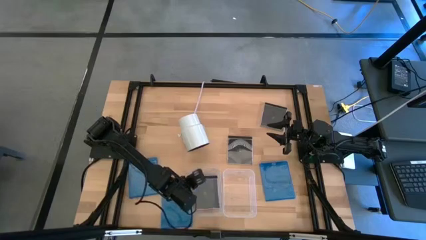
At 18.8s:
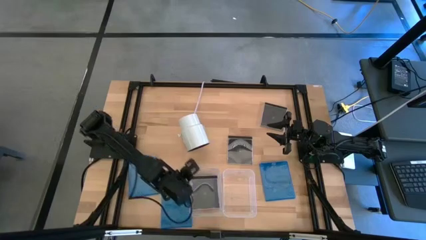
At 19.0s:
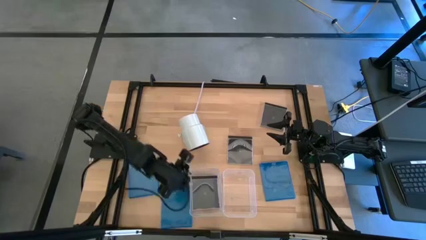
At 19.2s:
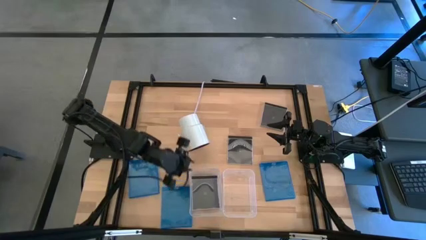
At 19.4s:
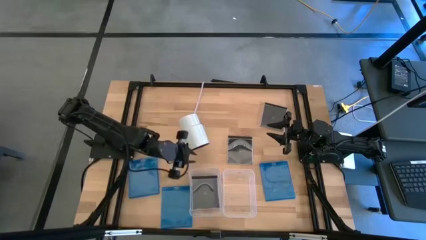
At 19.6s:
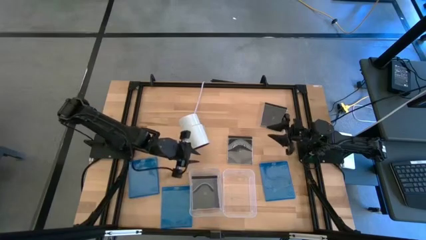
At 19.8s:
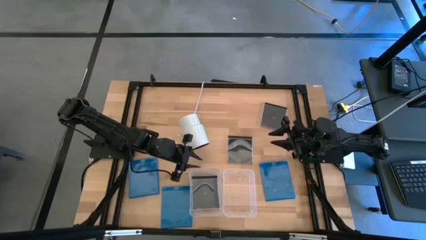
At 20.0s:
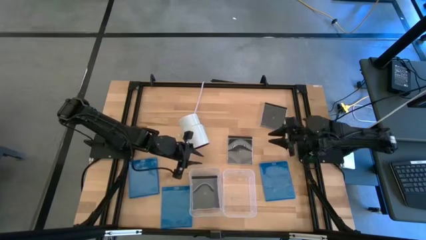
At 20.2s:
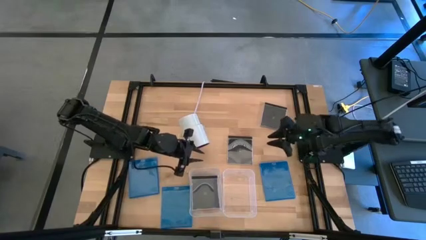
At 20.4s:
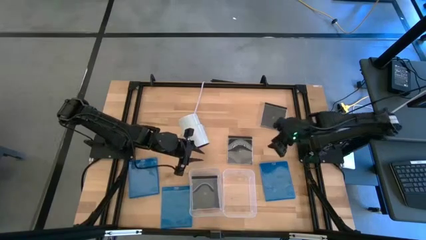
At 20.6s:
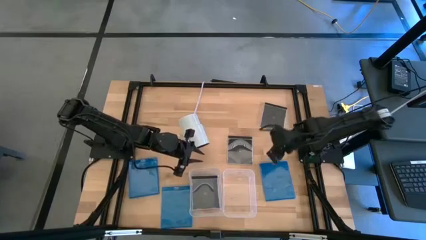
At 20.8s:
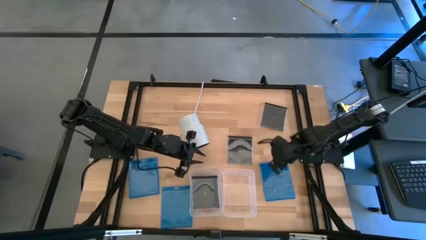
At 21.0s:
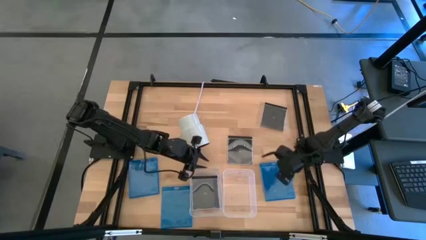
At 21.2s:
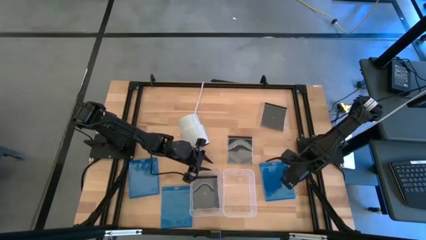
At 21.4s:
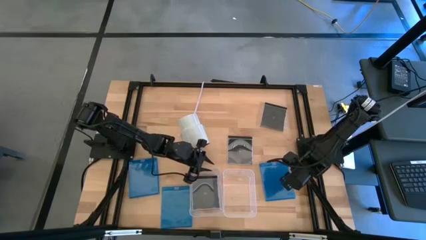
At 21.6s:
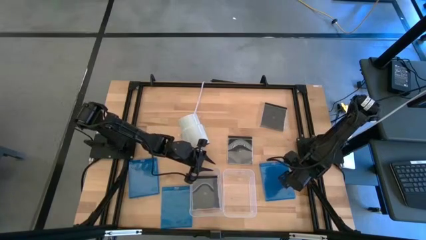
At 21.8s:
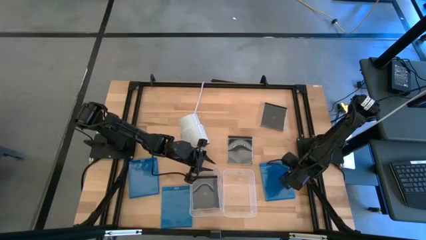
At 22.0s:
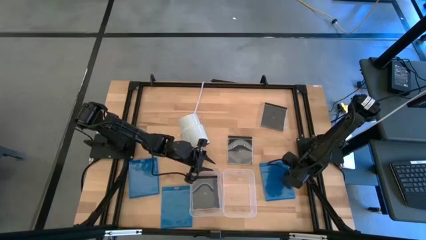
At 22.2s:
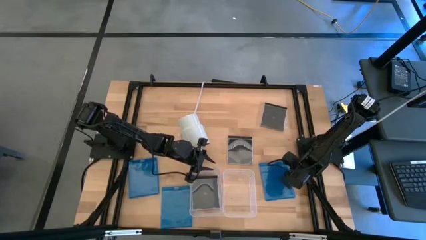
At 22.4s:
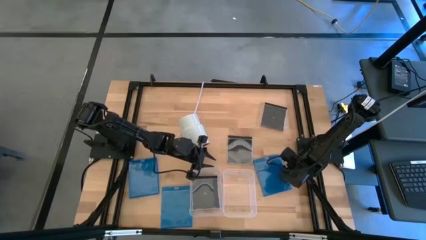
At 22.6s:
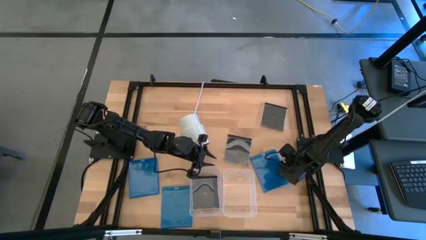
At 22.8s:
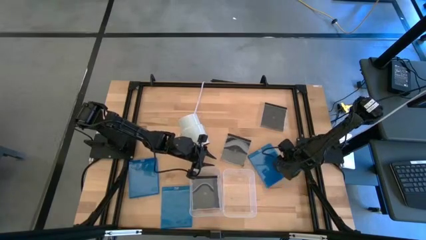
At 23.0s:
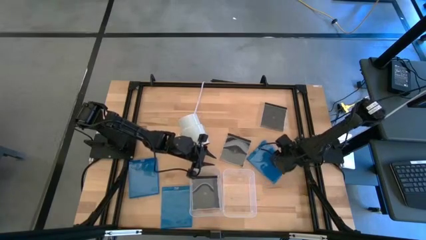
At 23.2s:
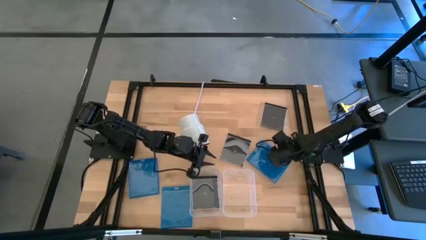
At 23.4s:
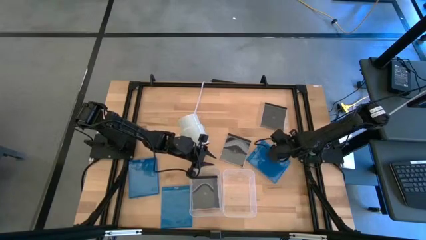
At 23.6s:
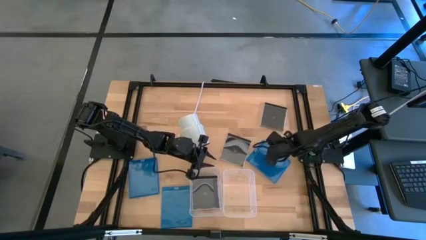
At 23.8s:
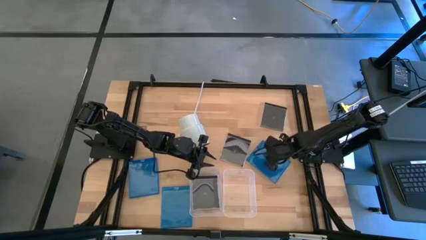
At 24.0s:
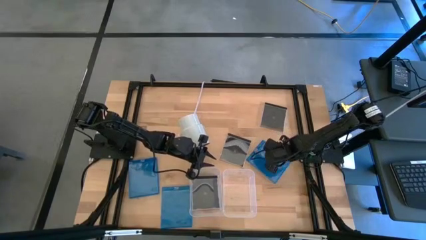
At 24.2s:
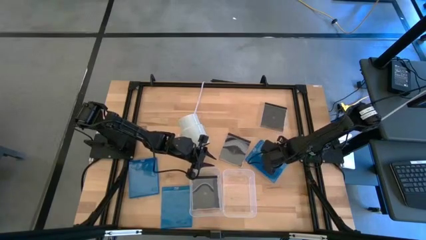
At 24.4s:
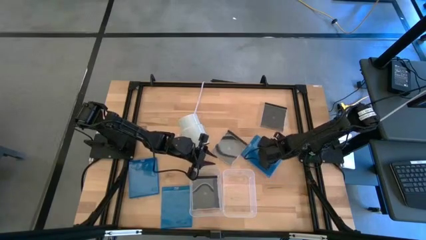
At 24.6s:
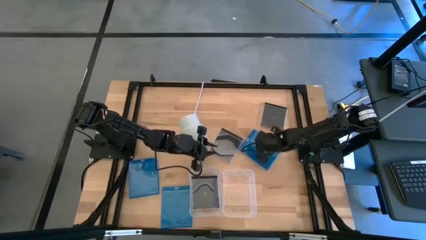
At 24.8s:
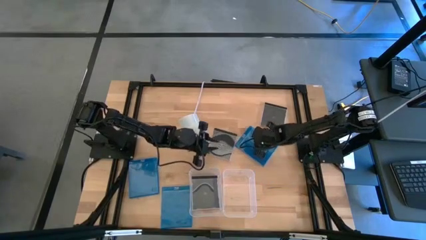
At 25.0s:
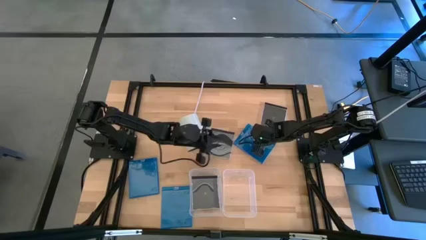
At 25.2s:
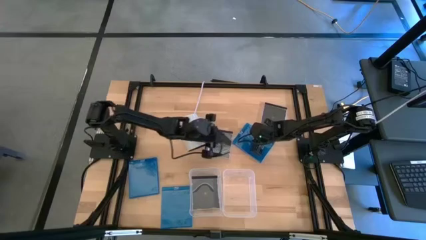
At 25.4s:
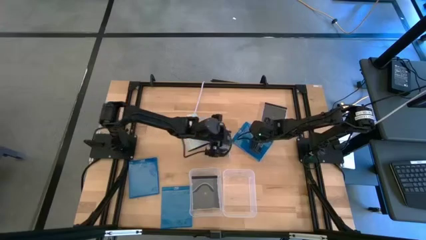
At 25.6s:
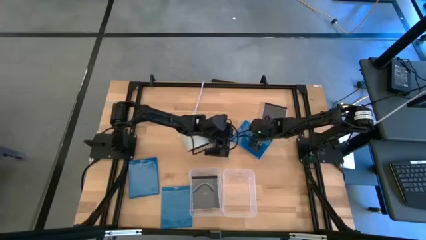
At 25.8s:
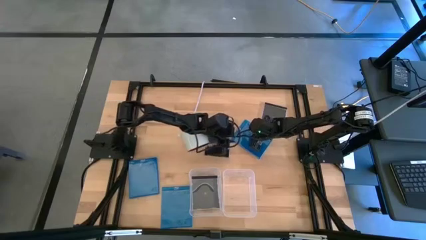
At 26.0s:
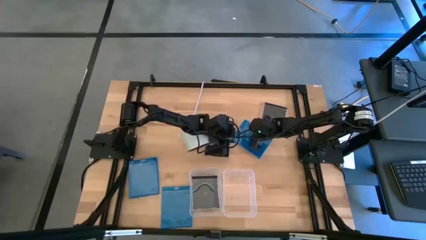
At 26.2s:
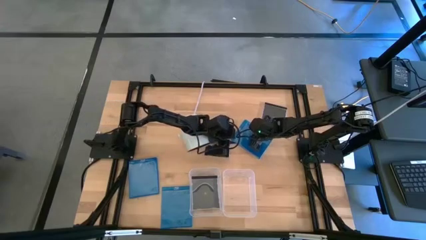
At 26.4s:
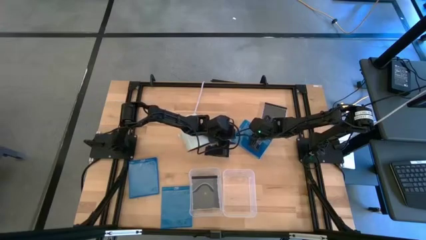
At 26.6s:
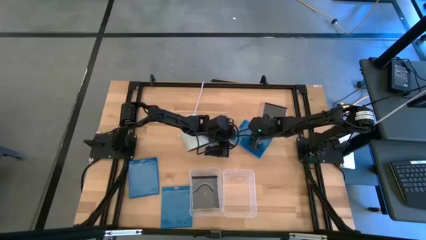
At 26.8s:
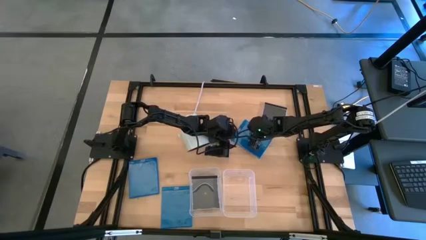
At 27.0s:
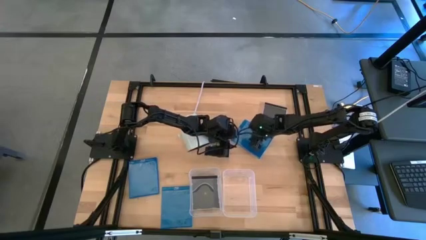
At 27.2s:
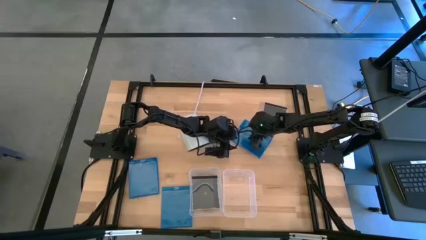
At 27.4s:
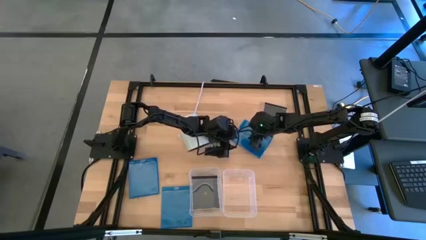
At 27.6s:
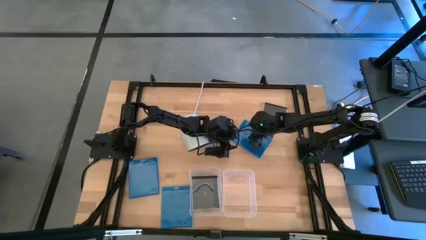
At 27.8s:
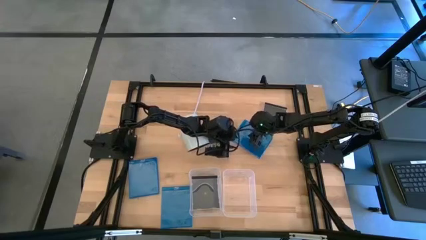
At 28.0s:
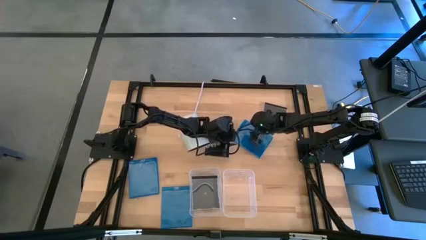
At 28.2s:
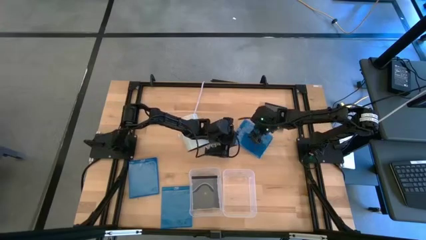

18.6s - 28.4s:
Task: Pick & place jewel cases by type
Put the top right blue cd case into the right transparent bin

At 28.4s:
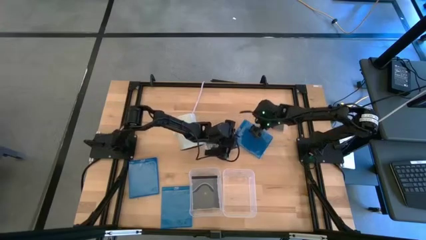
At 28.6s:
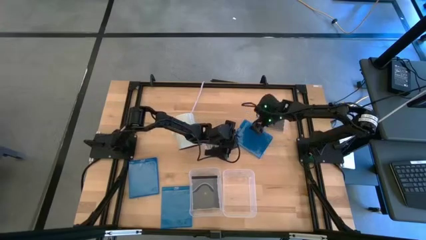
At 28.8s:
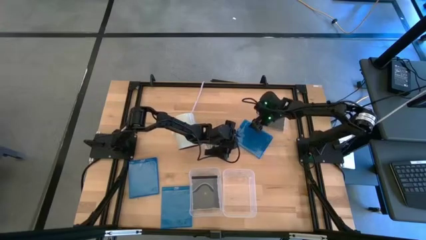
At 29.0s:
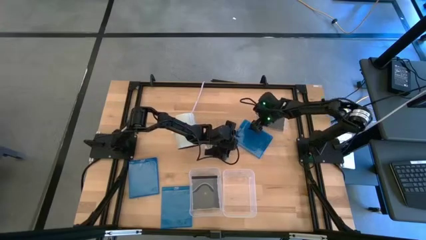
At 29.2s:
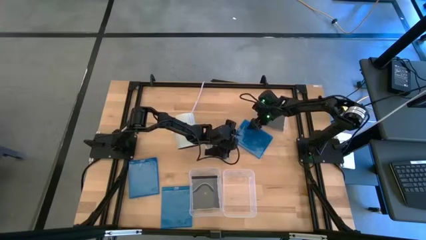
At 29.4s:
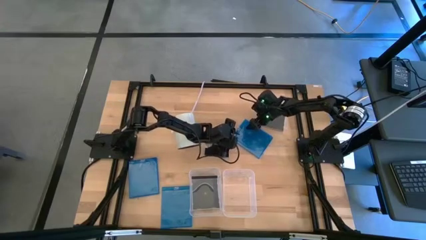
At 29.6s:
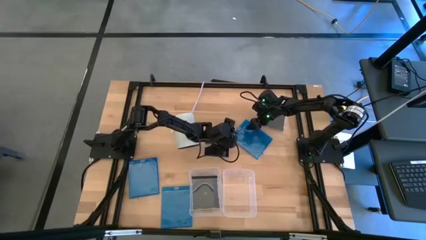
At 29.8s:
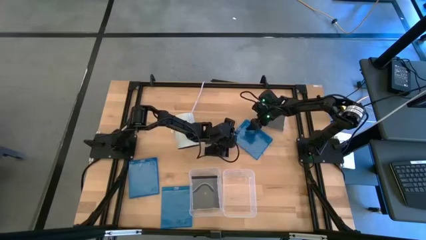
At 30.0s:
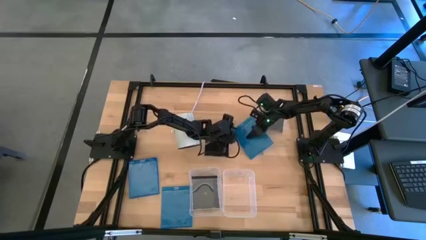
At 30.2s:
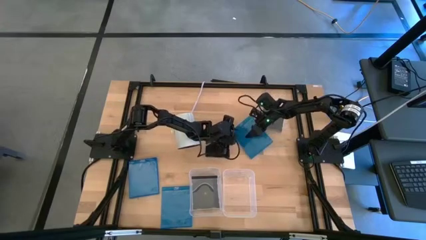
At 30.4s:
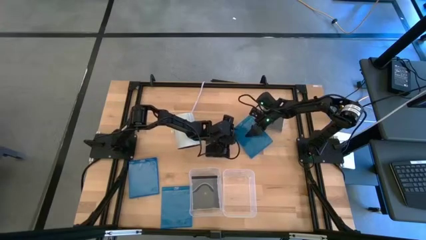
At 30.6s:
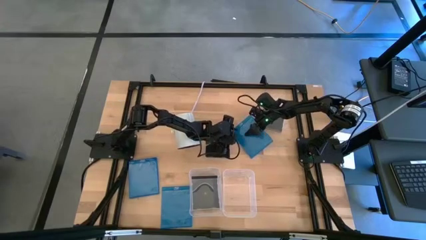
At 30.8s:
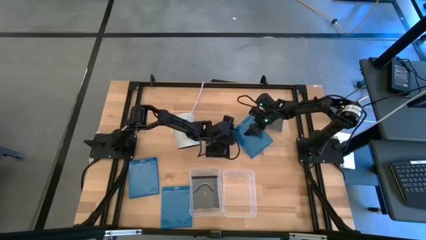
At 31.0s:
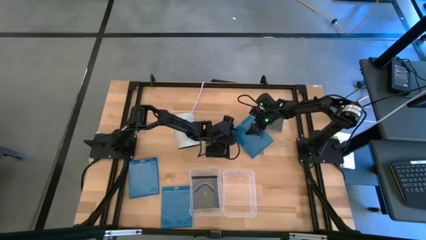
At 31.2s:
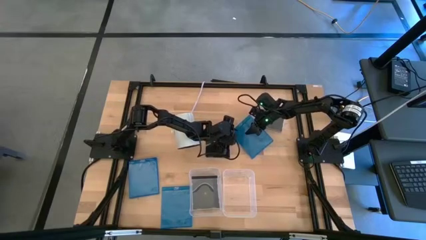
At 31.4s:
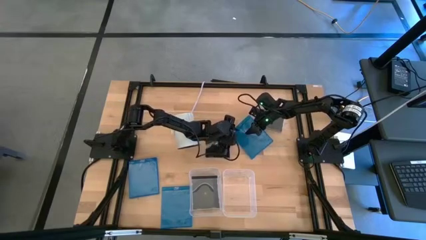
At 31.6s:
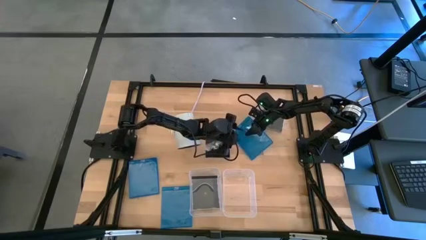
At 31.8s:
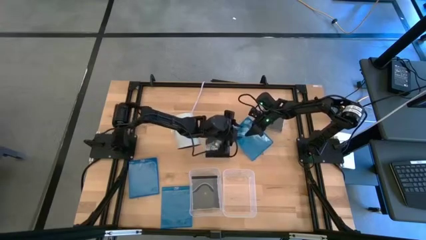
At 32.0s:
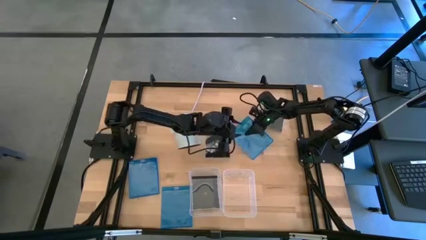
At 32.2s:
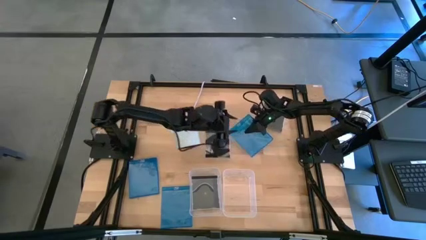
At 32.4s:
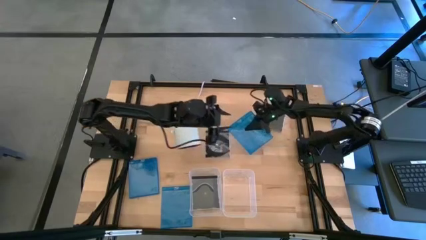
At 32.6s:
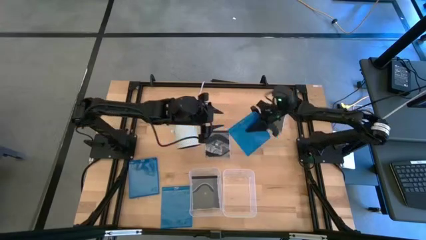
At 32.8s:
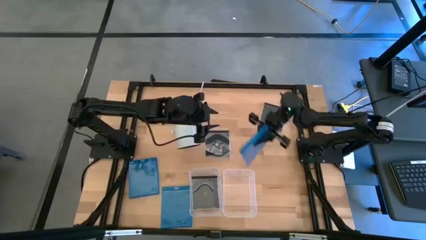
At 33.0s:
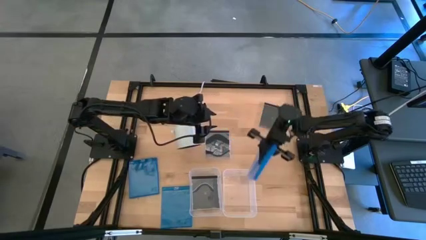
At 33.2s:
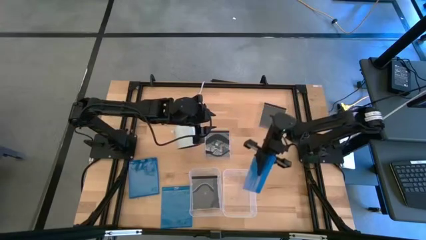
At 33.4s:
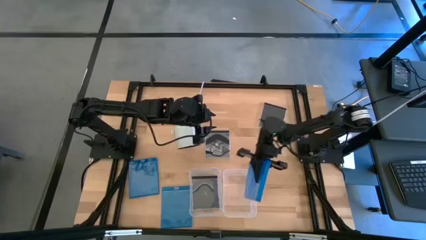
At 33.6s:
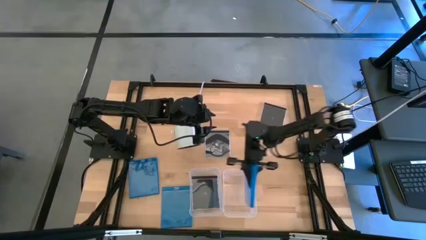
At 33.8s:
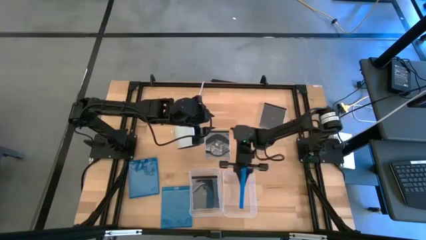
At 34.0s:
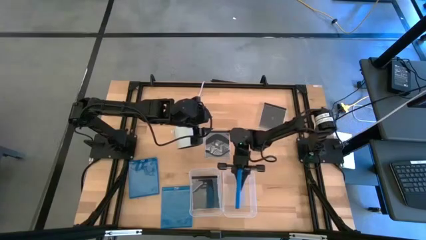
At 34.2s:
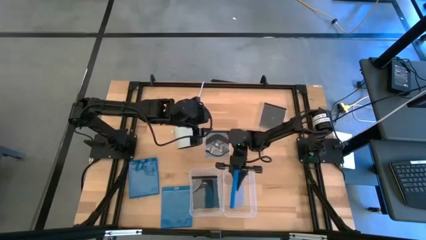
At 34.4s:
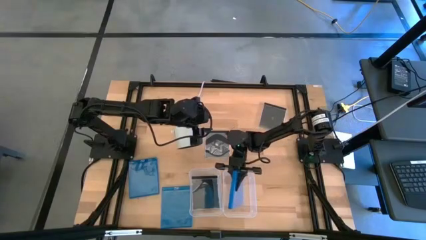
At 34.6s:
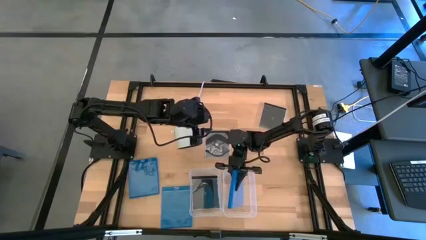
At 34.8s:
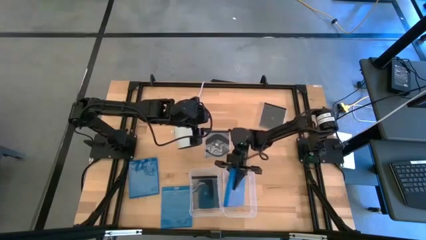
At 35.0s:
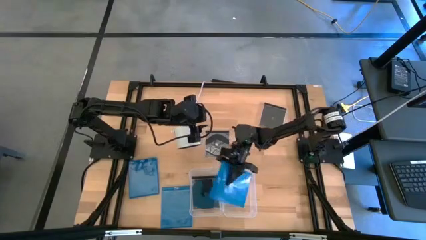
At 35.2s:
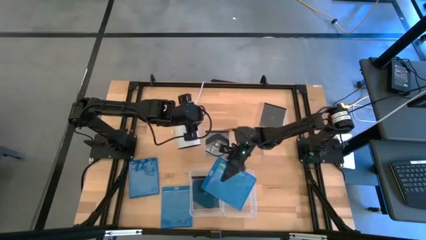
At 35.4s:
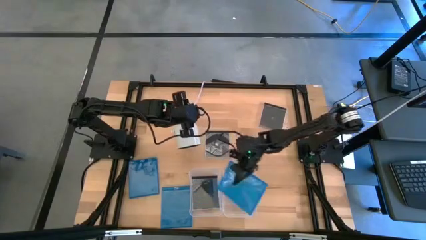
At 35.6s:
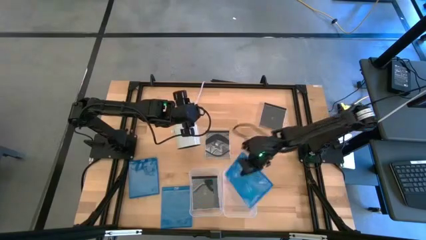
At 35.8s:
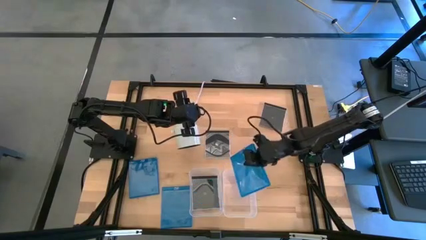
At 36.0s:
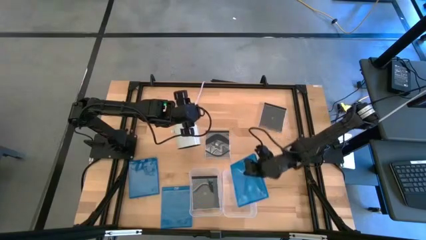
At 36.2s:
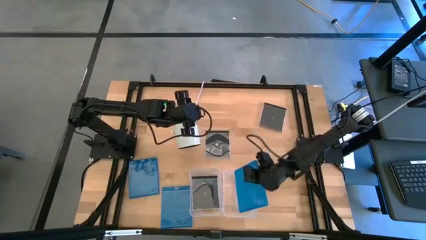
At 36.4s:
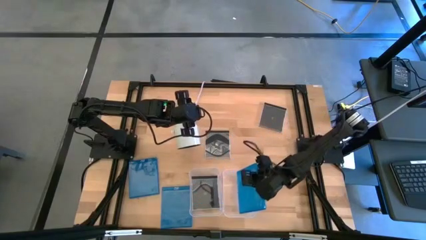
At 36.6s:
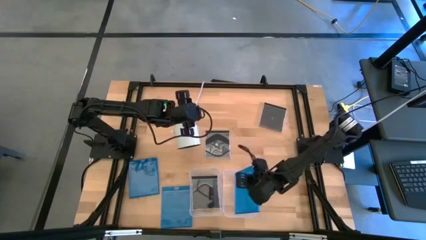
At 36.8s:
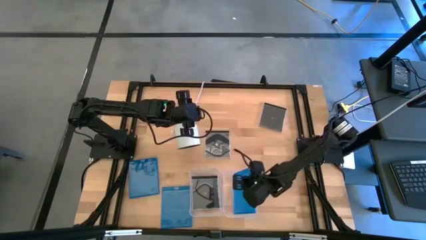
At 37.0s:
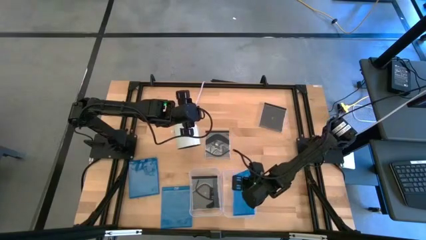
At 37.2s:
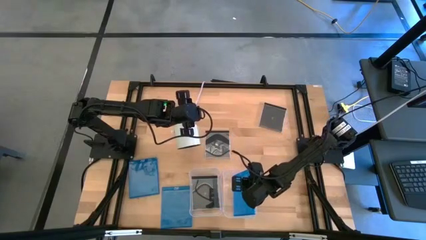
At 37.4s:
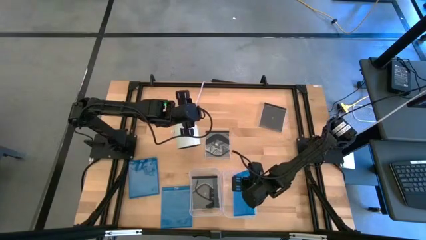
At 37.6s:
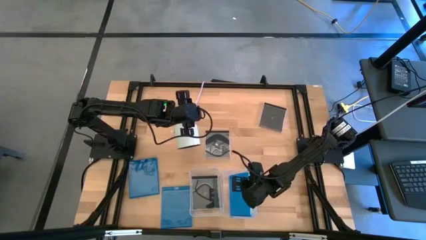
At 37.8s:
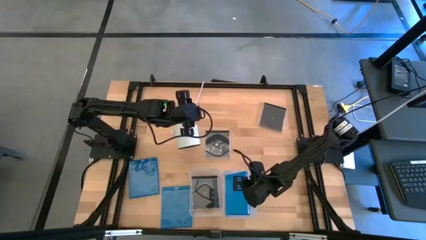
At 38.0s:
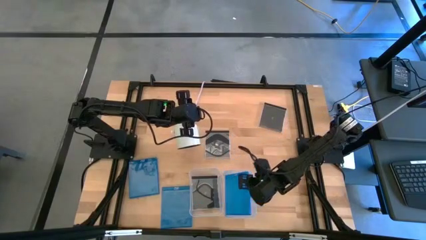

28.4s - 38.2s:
Put the top right blue cd case into the right transparent bin
